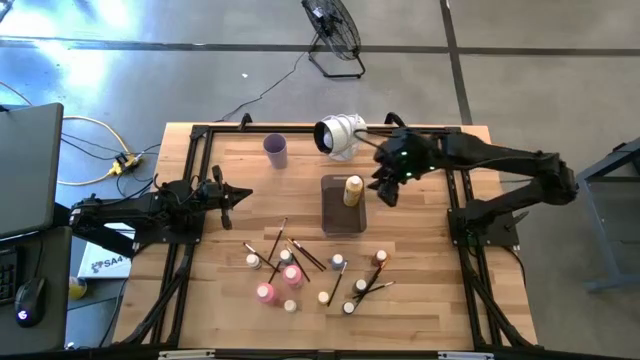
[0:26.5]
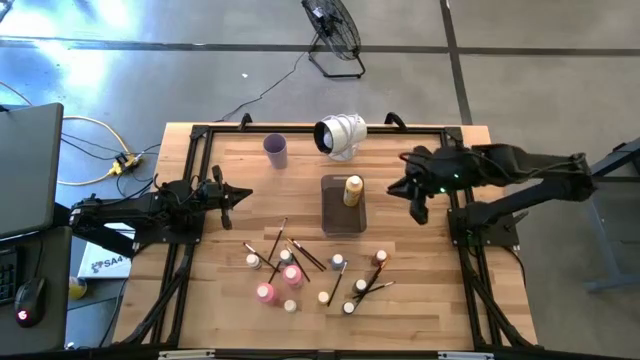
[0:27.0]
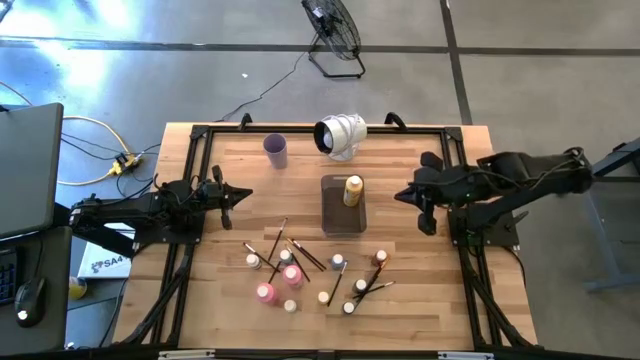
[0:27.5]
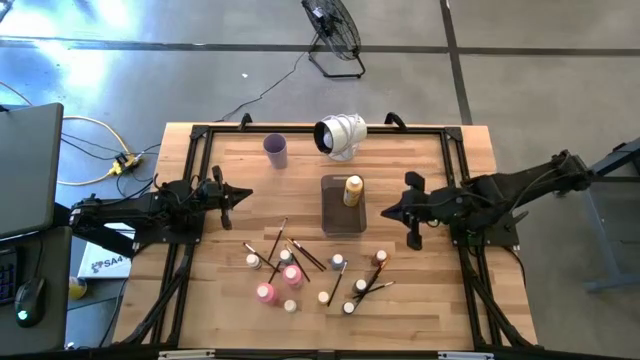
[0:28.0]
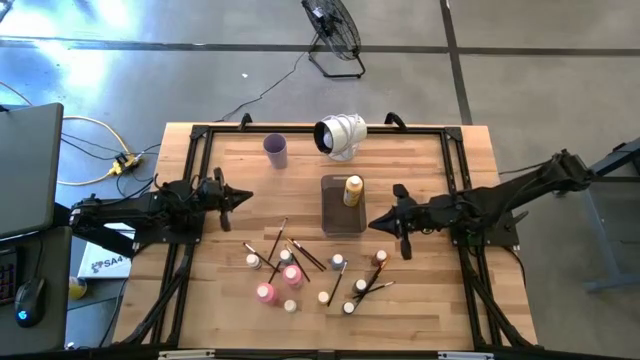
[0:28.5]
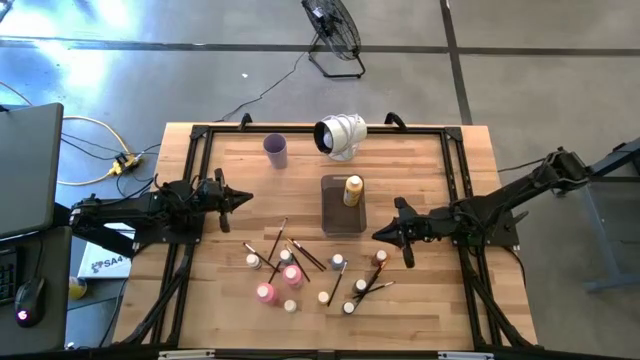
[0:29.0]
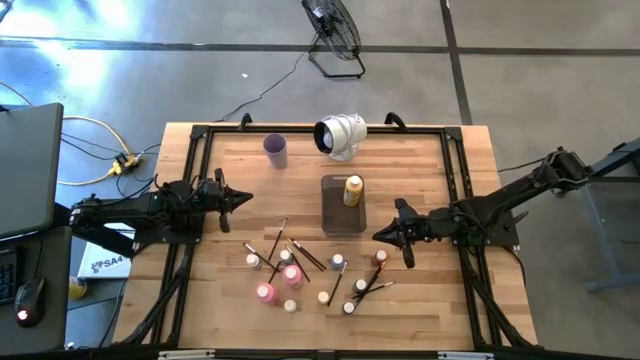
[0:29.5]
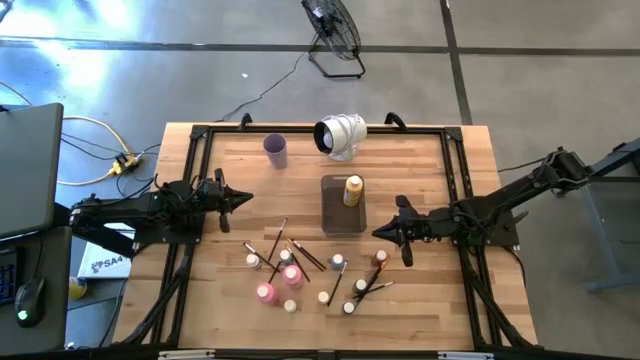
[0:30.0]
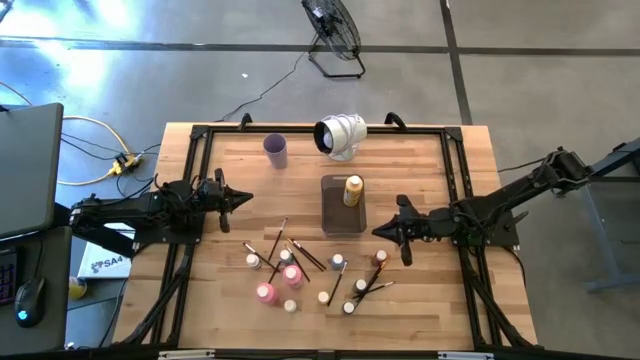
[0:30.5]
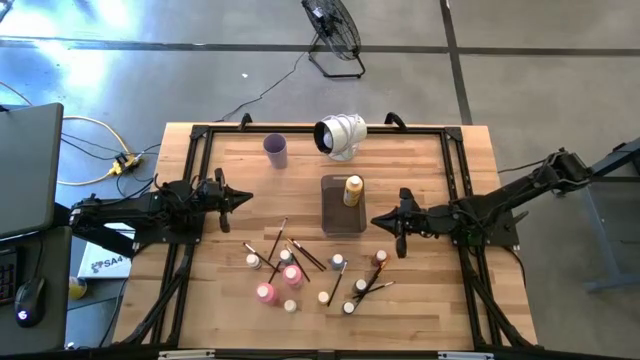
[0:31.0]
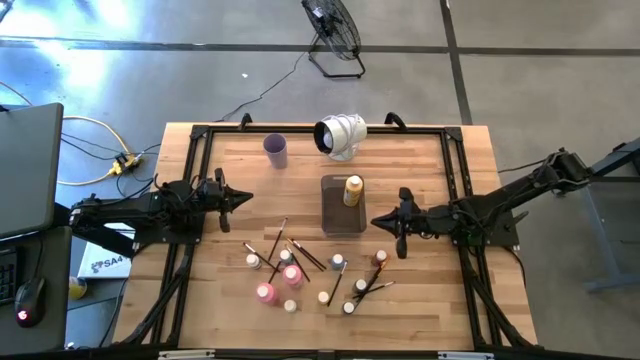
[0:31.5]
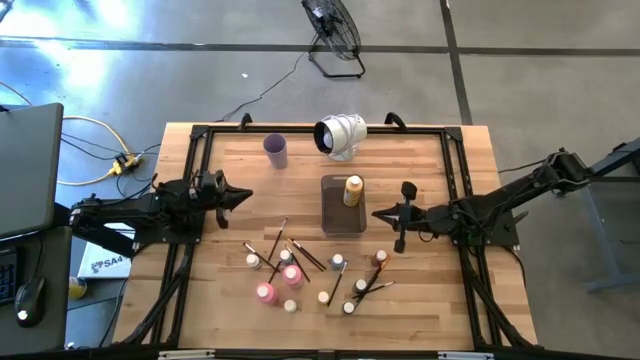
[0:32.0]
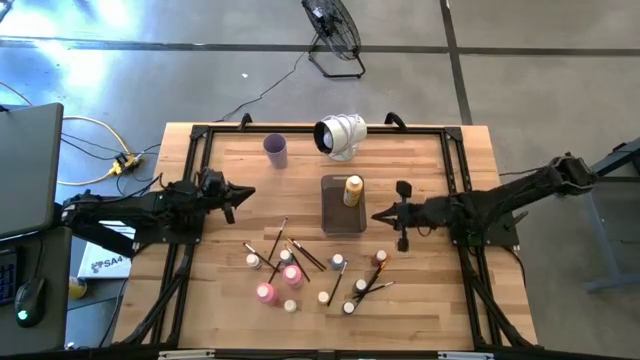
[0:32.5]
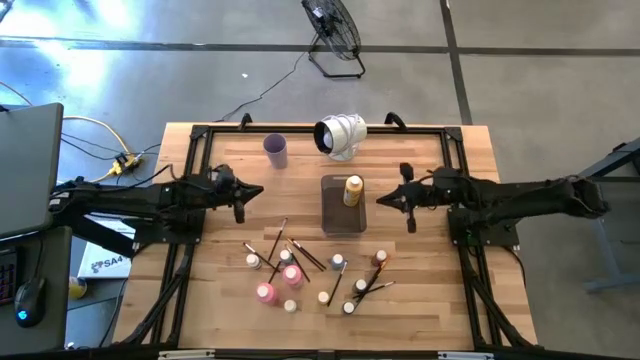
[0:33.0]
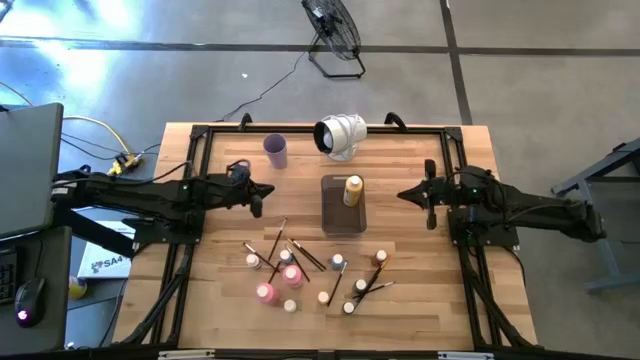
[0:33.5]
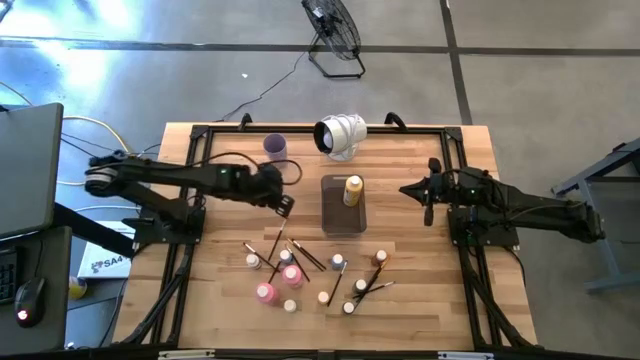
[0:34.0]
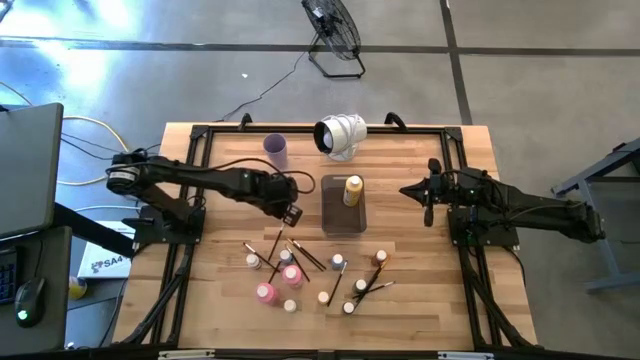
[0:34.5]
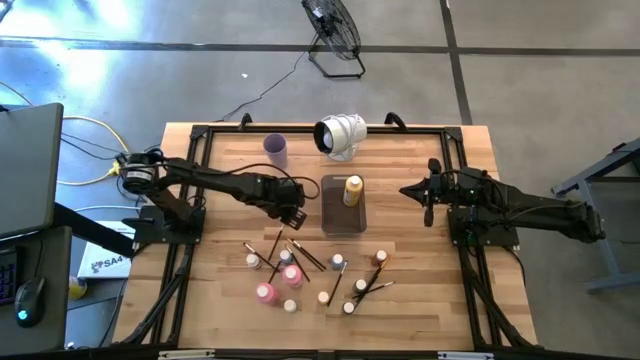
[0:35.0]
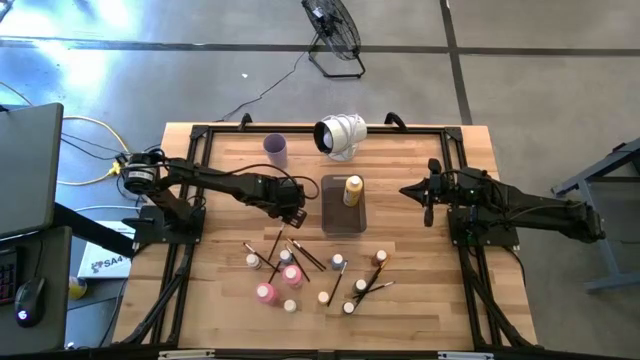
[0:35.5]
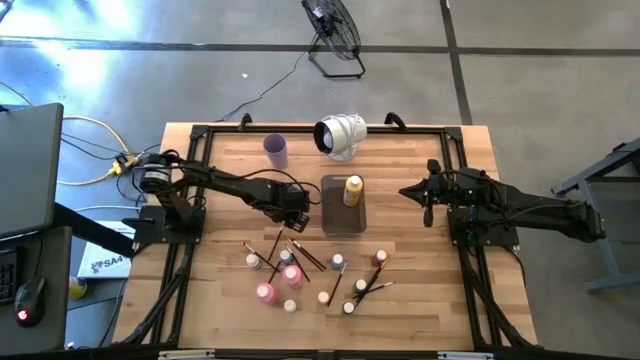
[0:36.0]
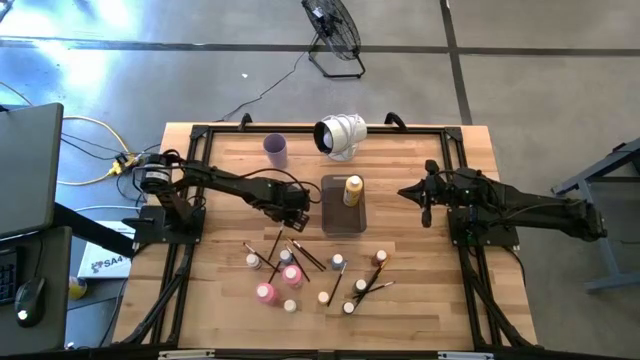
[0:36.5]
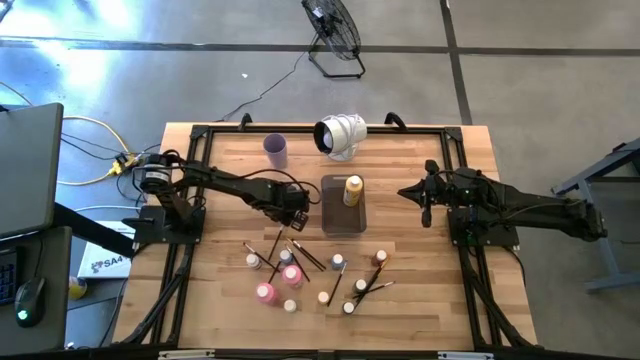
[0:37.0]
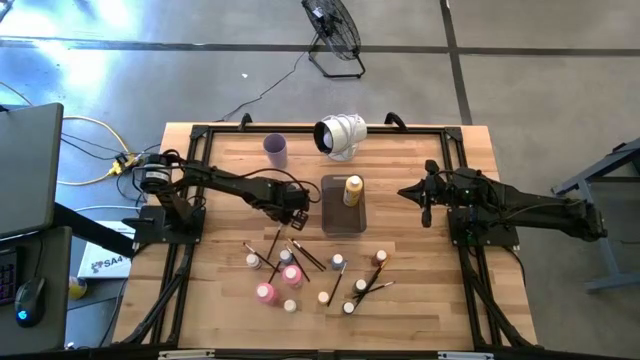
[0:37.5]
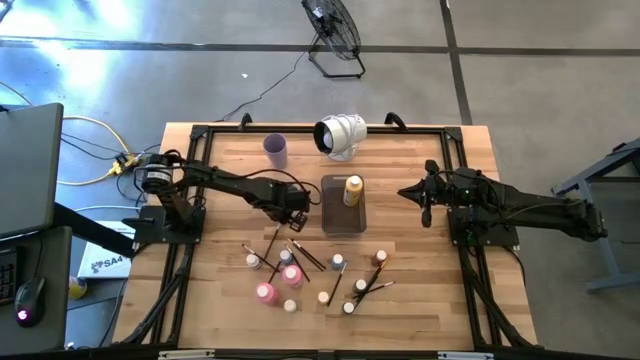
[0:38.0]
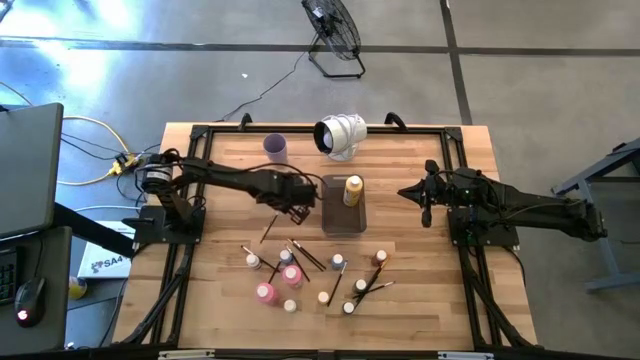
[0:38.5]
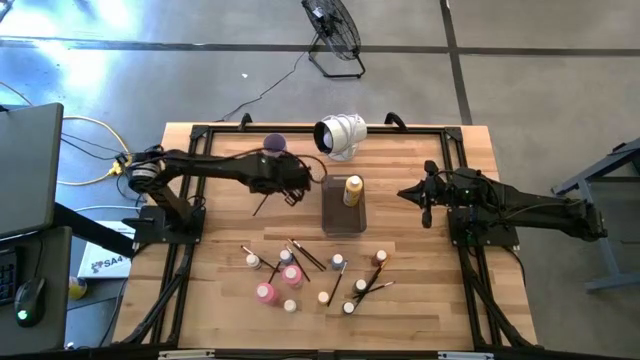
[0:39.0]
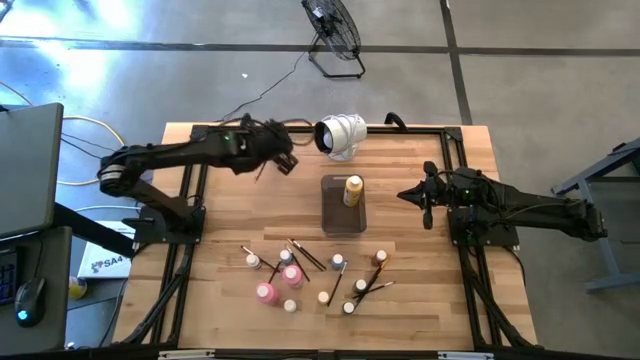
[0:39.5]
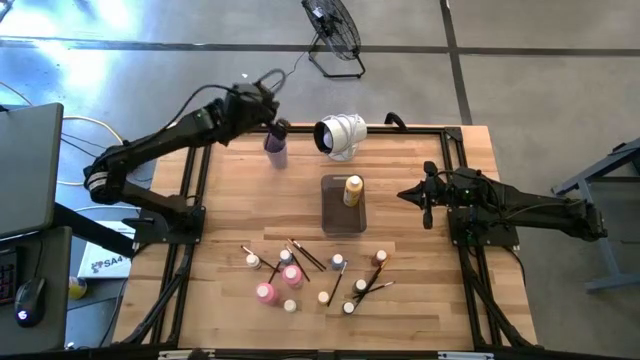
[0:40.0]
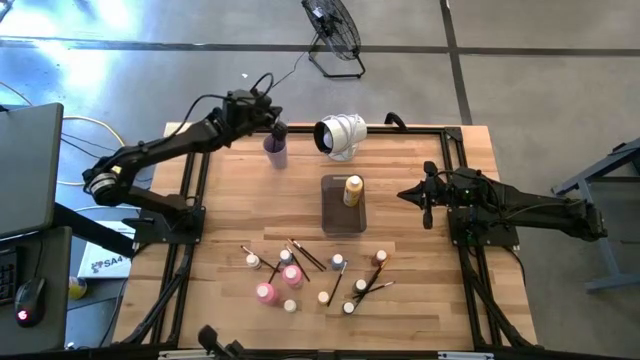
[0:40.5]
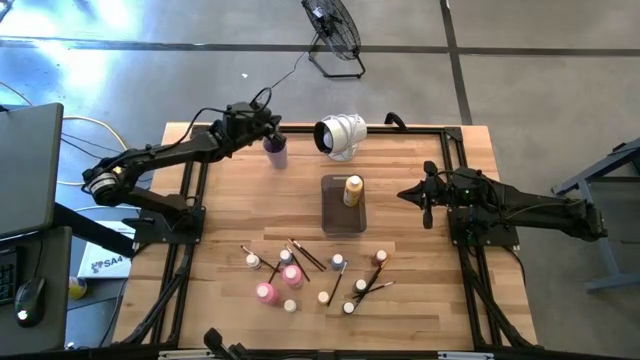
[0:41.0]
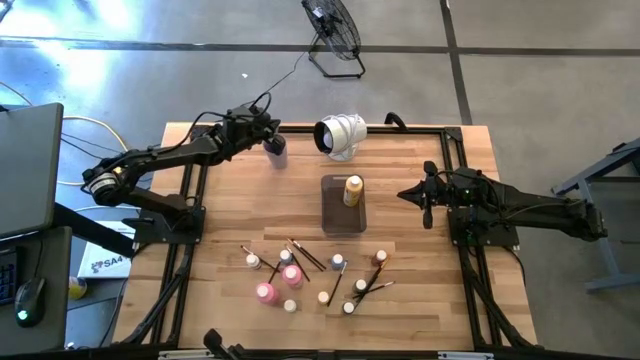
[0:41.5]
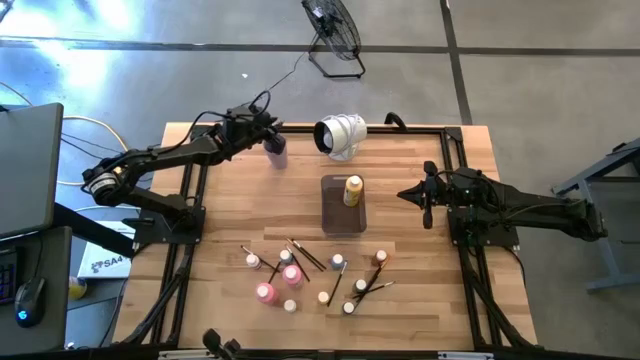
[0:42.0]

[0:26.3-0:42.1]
Task: Pick & Place Paint Supplies
Put the silver paint brush into the violet cup

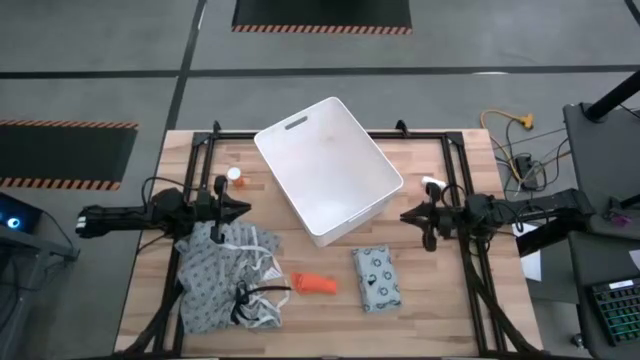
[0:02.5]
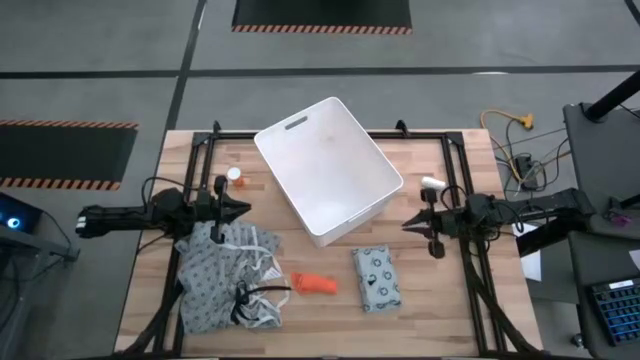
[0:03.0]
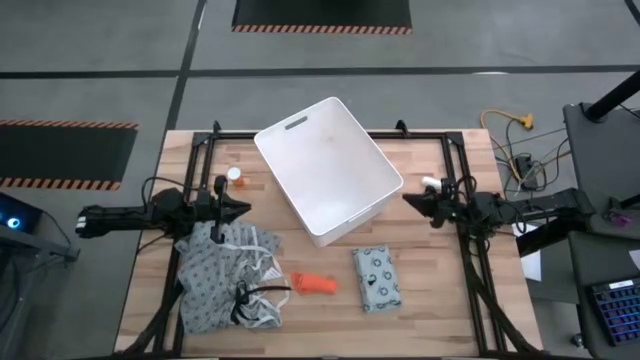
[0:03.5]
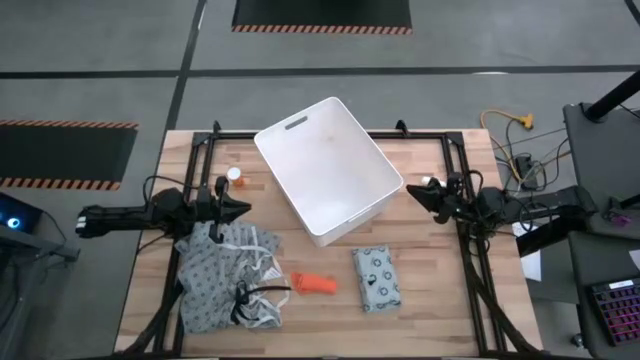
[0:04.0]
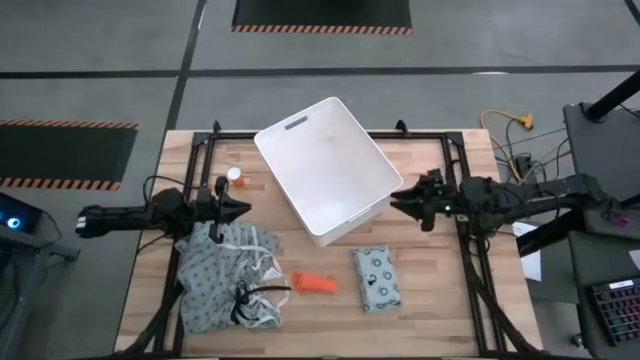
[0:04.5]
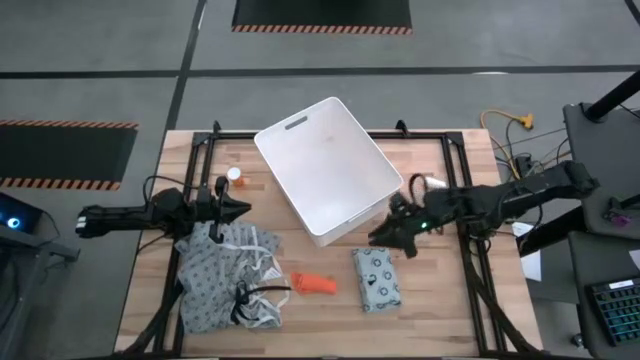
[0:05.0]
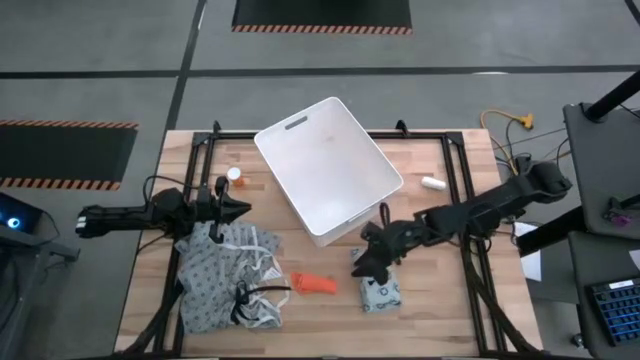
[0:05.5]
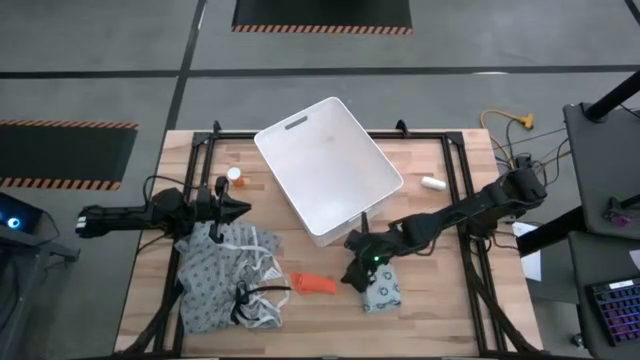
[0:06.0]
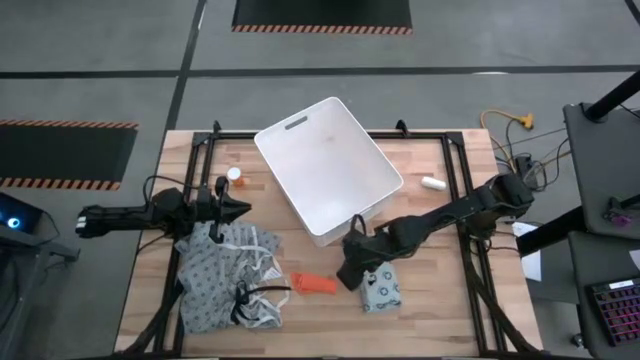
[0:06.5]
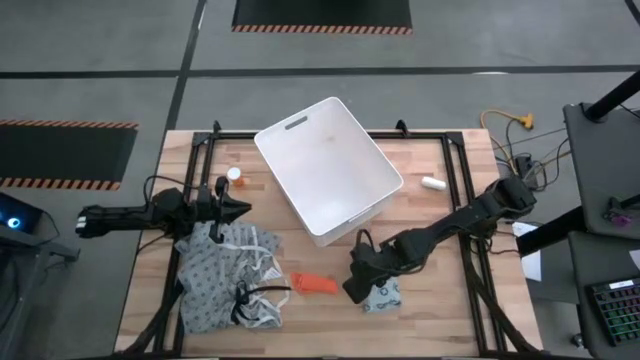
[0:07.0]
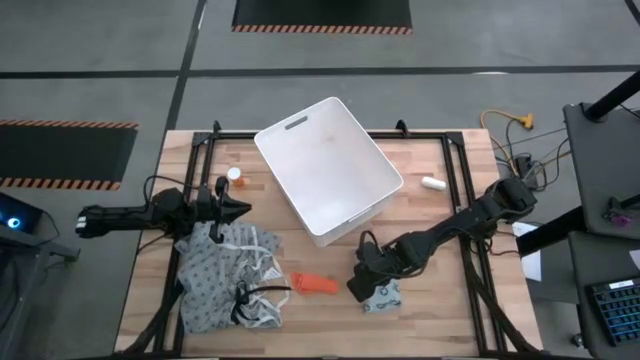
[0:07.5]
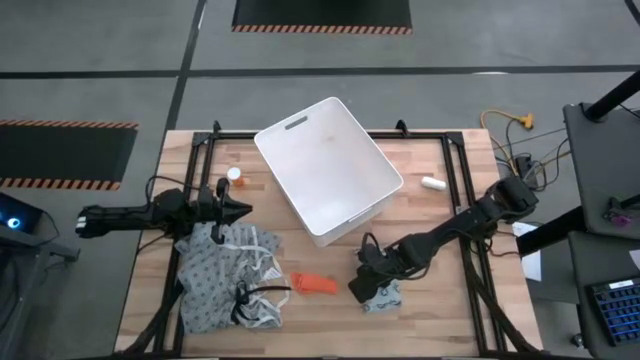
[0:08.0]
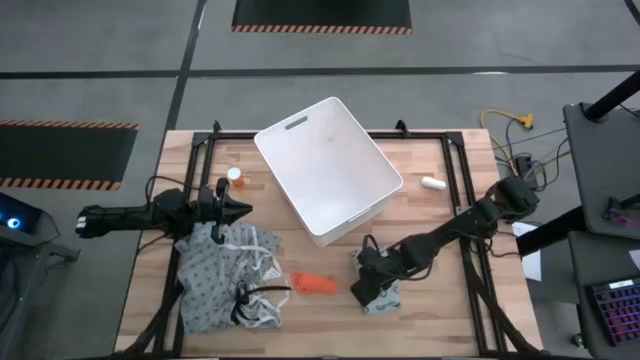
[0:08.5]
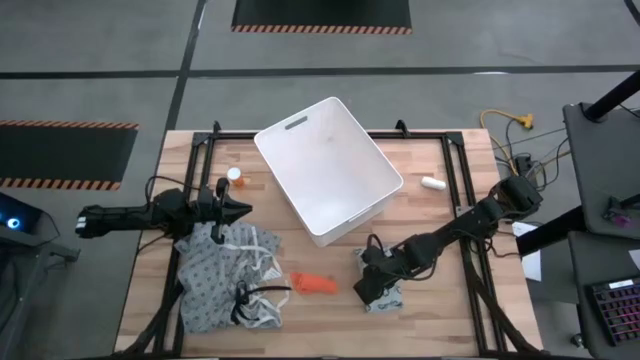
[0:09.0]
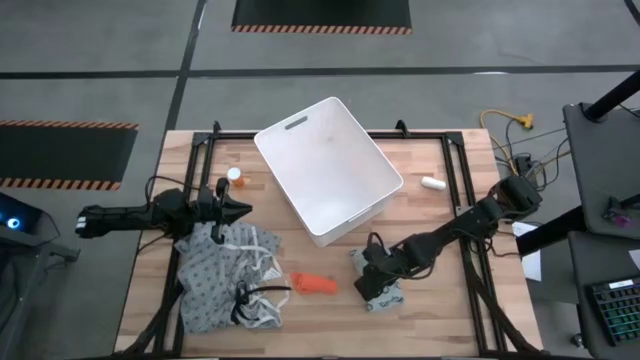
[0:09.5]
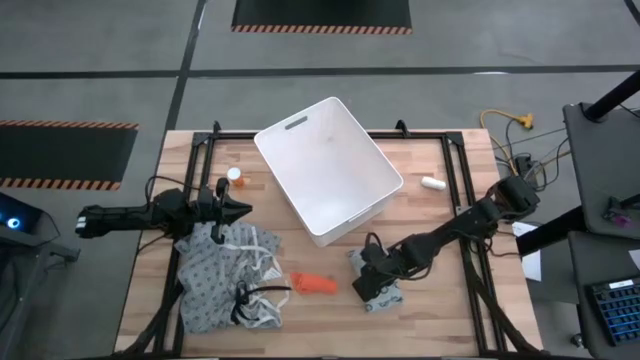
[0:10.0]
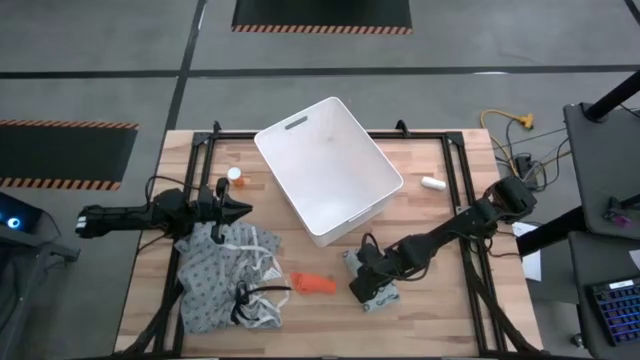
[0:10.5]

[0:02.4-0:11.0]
Task: Pick & place medical supplies in basket/bin
Put the blue mailer bag into the white bin
